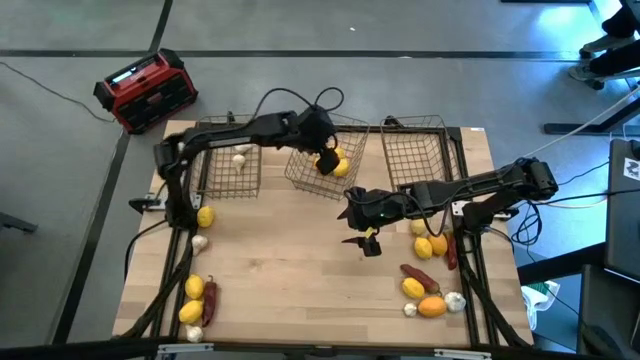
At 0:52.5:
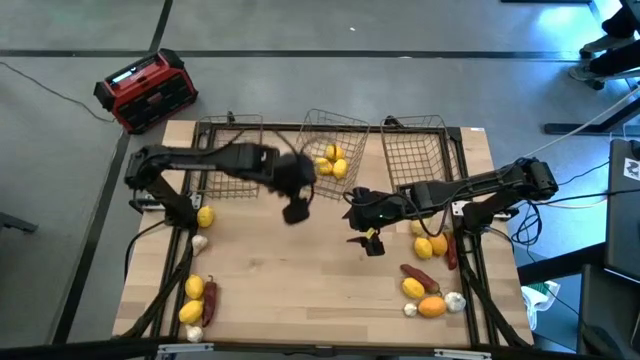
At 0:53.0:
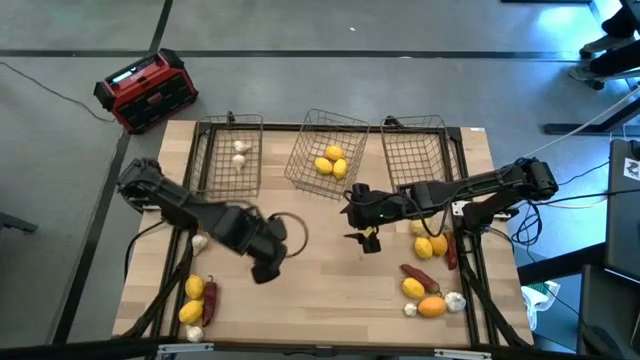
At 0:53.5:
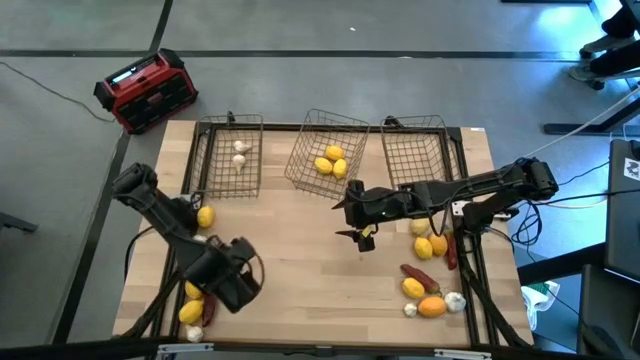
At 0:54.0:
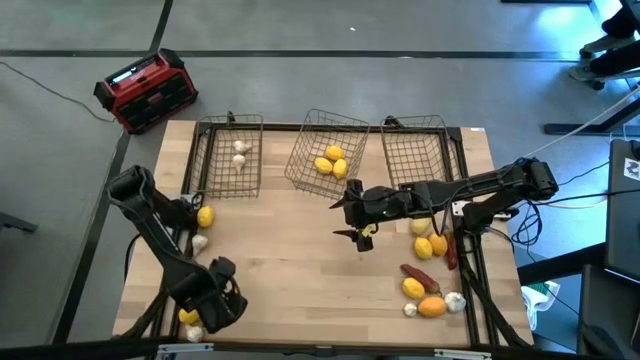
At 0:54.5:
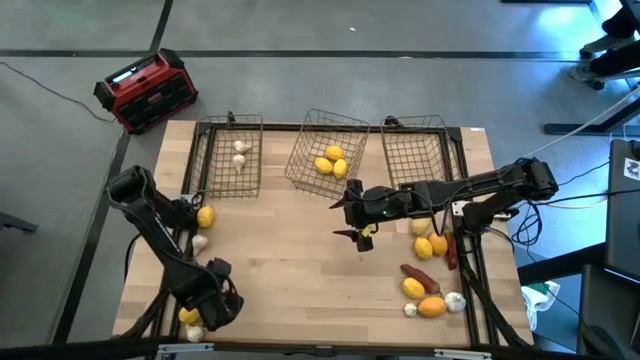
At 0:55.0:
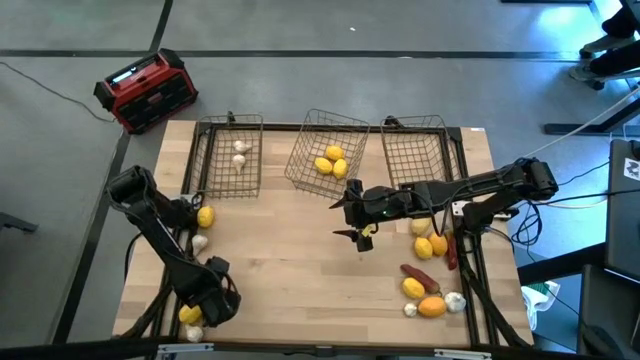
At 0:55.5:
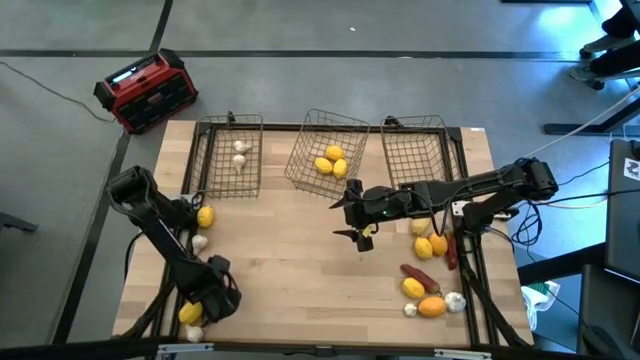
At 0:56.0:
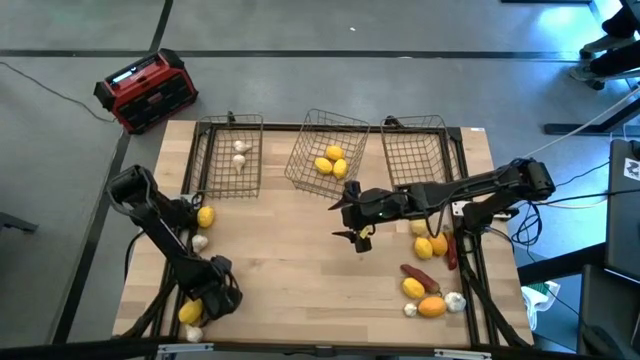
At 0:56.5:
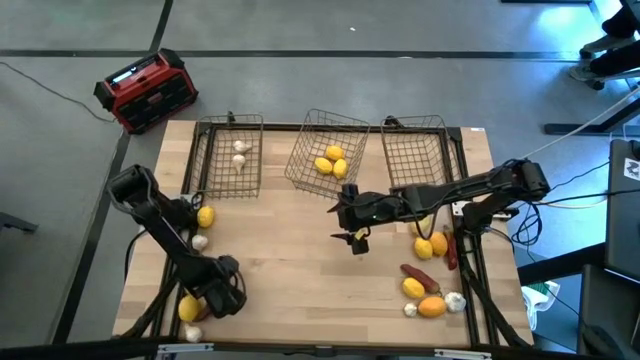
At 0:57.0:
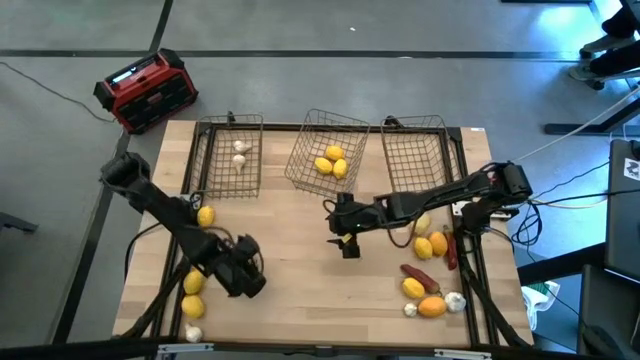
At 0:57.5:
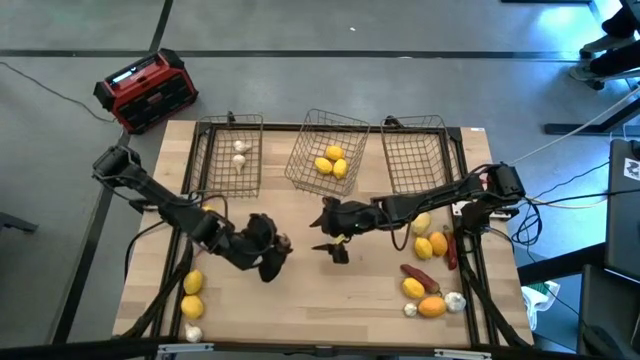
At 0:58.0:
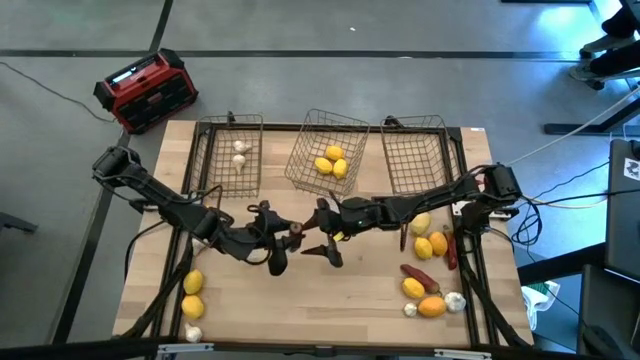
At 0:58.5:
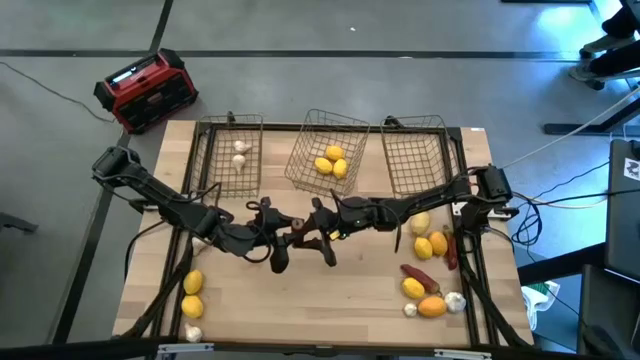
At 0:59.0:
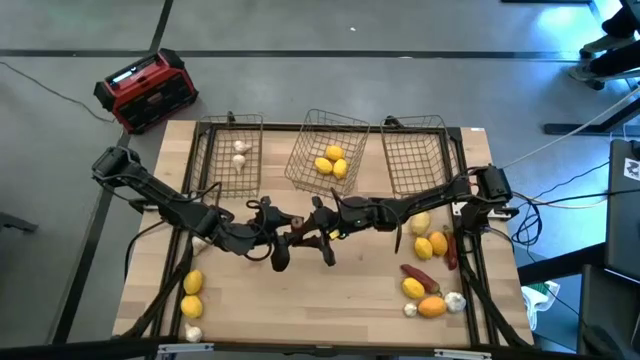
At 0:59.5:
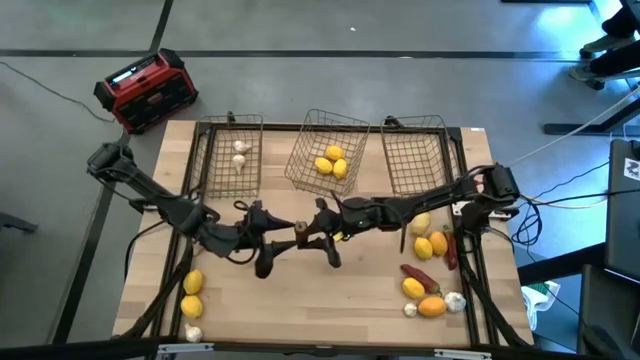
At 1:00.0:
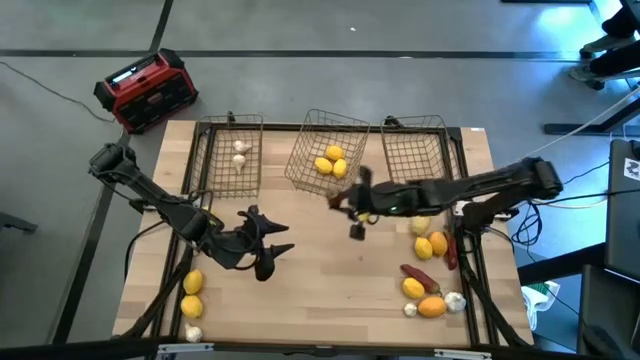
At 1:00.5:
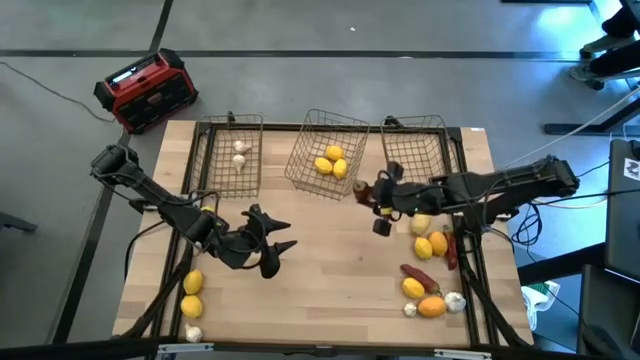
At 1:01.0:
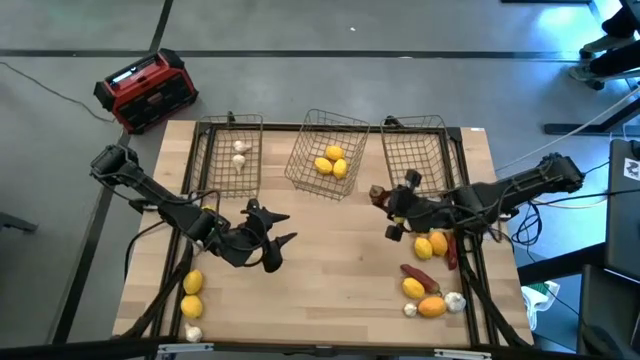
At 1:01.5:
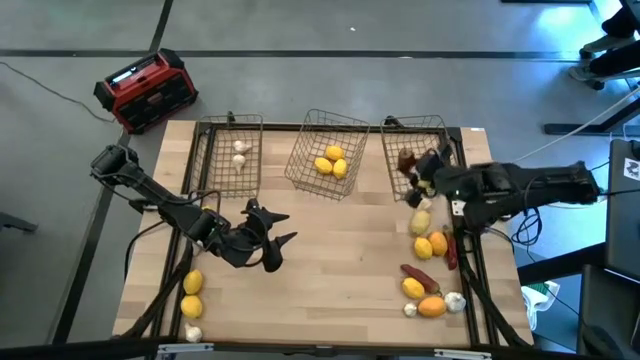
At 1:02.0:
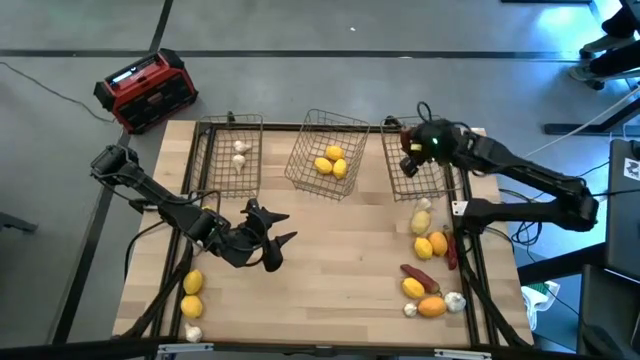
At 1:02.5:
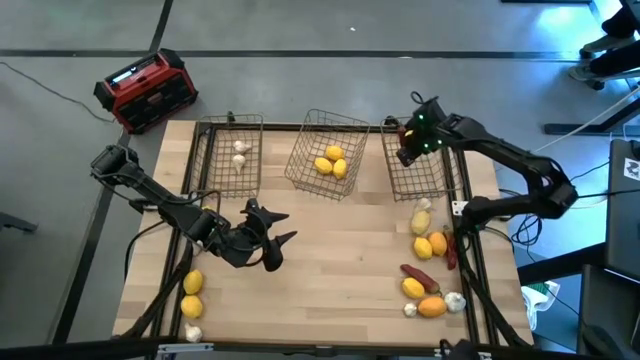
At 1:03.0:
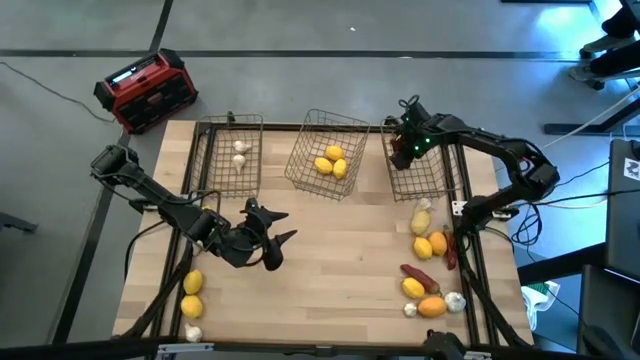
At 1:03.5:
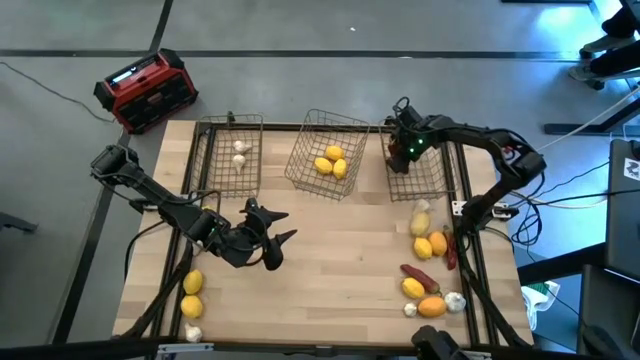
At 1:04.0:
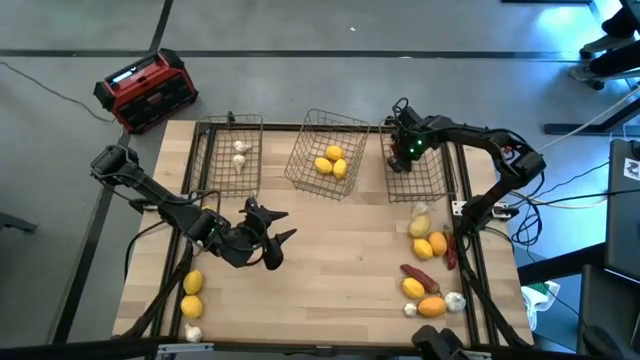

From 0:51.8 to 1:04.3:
Task: Sort produce into baskets
Put the bell pepper into the right wire basket

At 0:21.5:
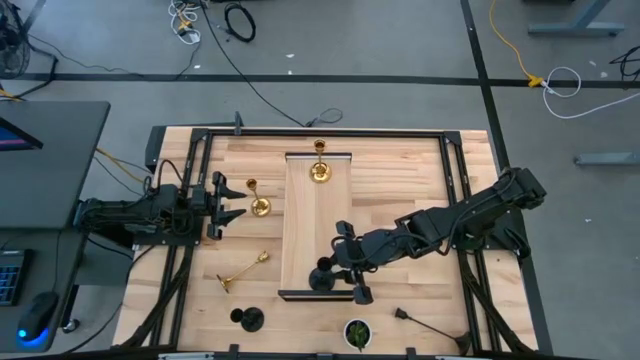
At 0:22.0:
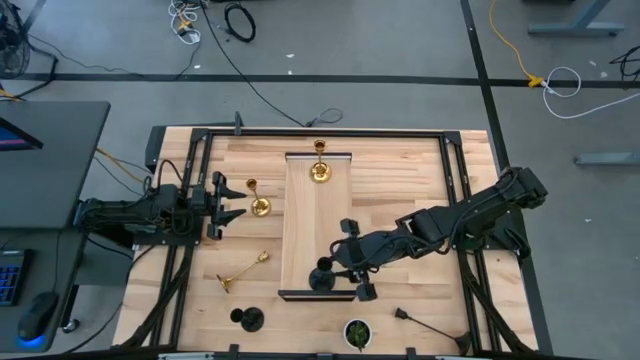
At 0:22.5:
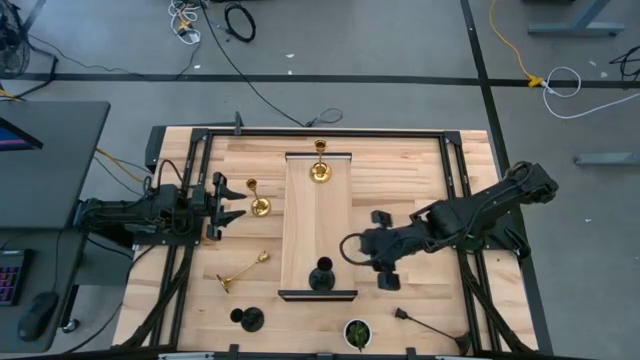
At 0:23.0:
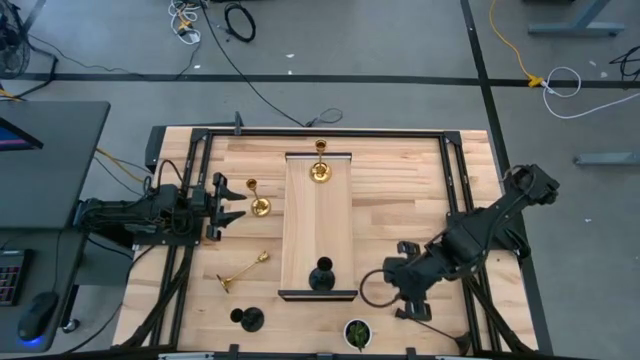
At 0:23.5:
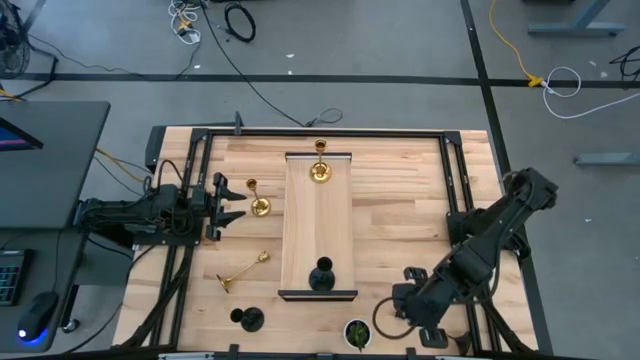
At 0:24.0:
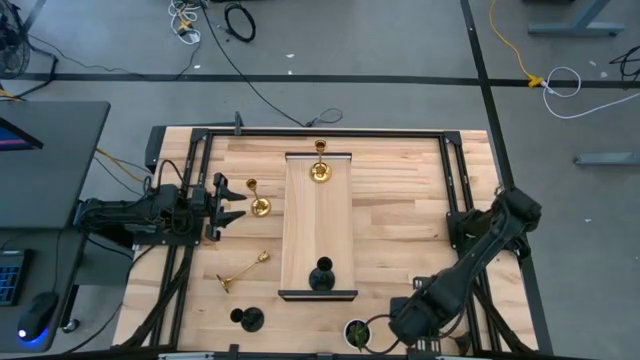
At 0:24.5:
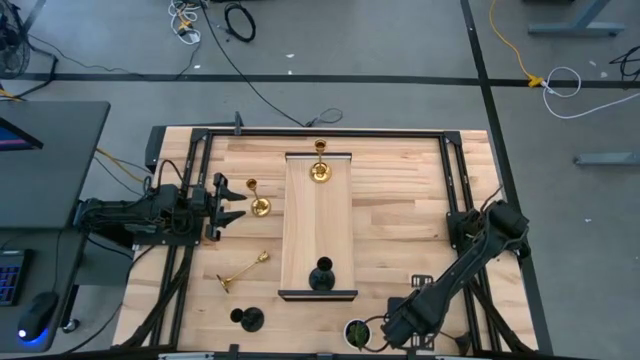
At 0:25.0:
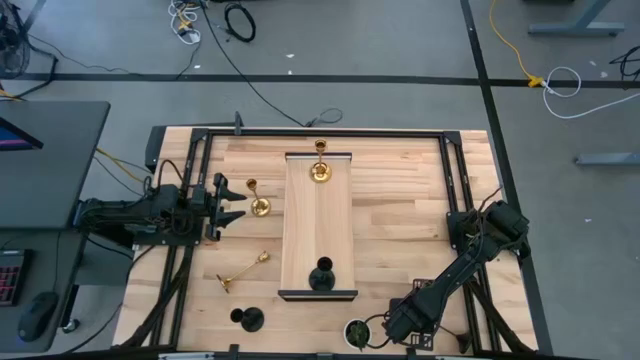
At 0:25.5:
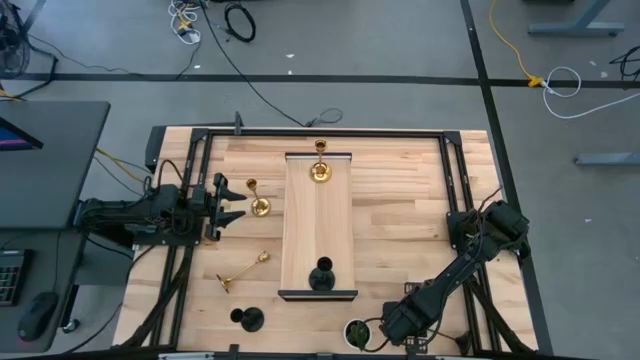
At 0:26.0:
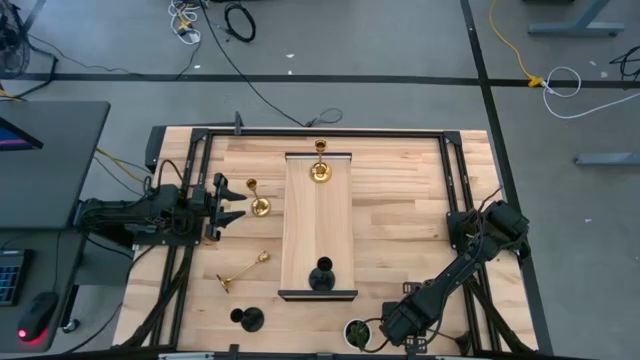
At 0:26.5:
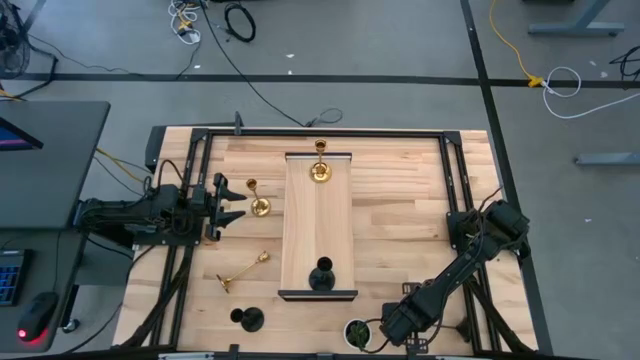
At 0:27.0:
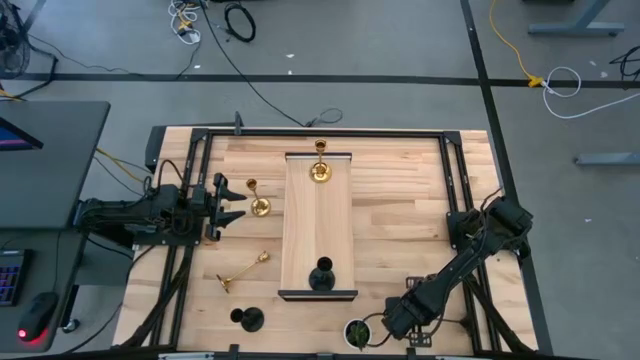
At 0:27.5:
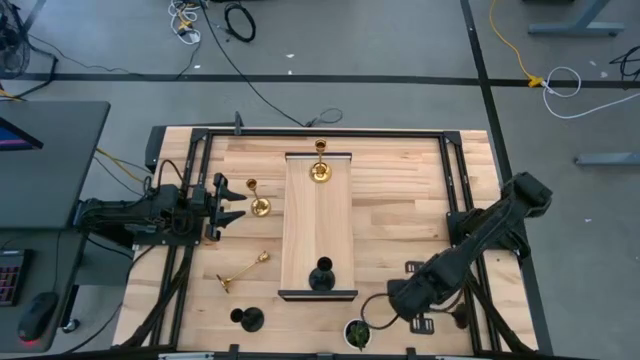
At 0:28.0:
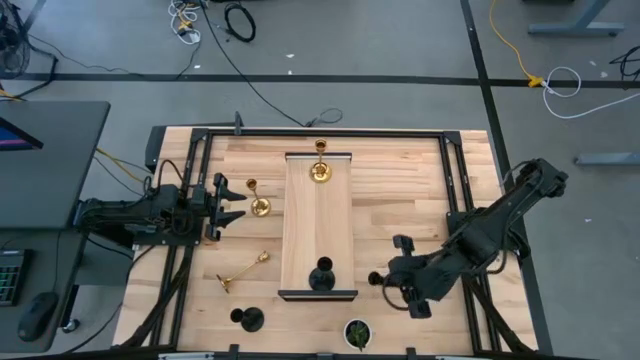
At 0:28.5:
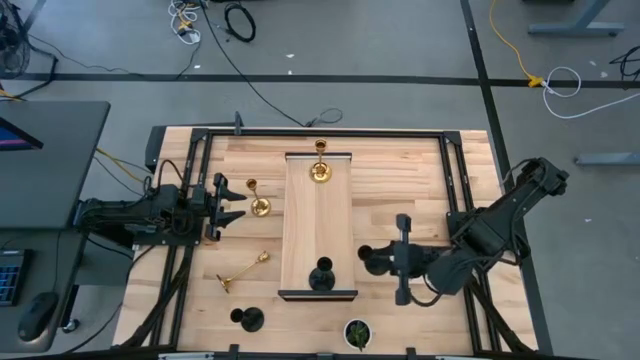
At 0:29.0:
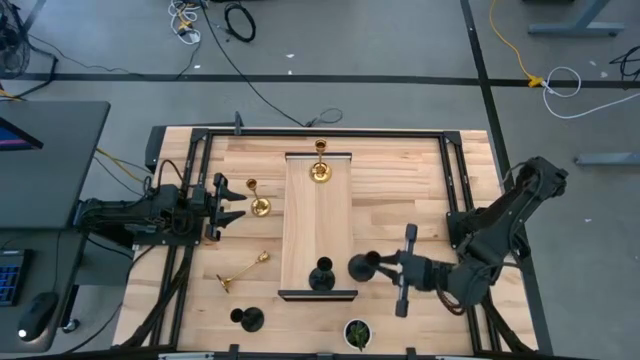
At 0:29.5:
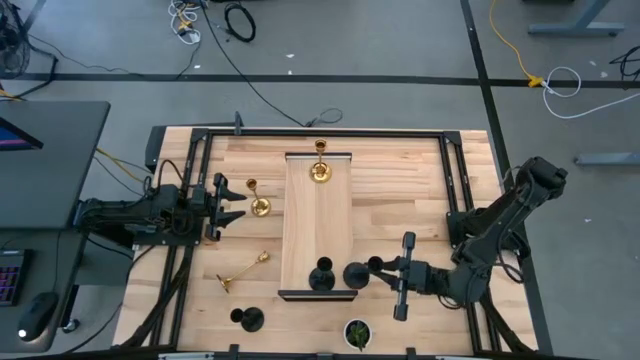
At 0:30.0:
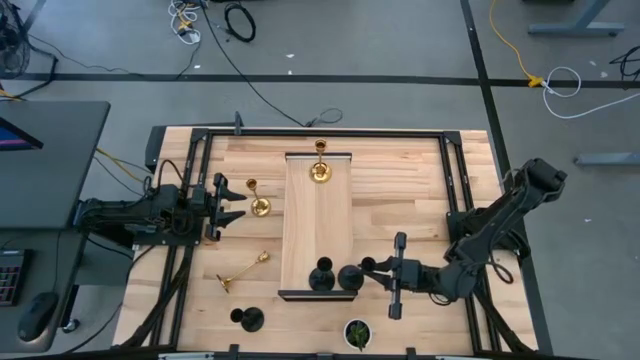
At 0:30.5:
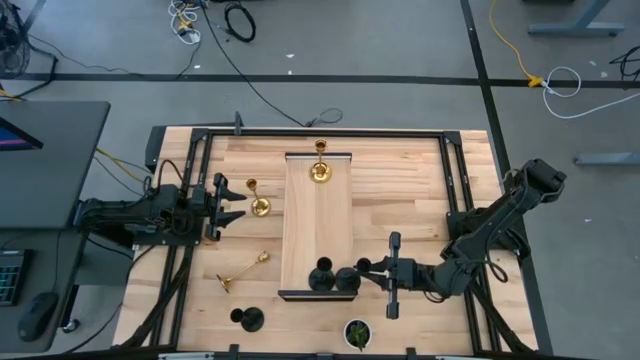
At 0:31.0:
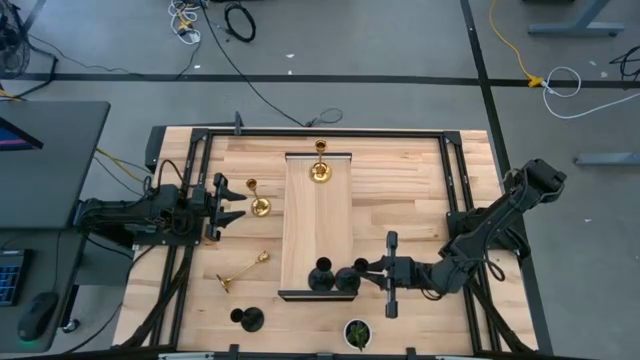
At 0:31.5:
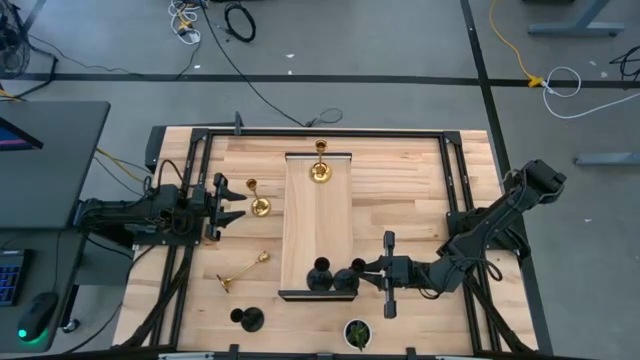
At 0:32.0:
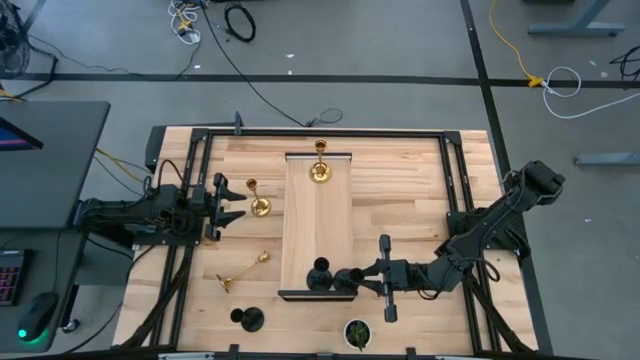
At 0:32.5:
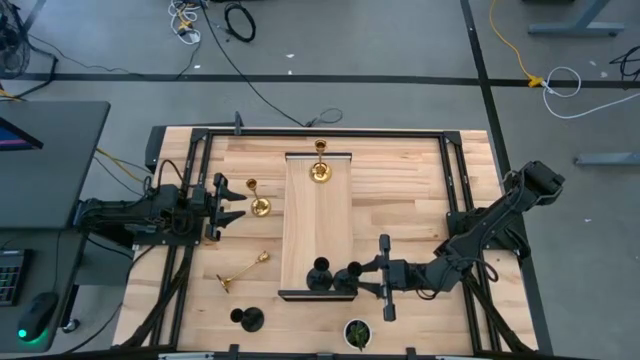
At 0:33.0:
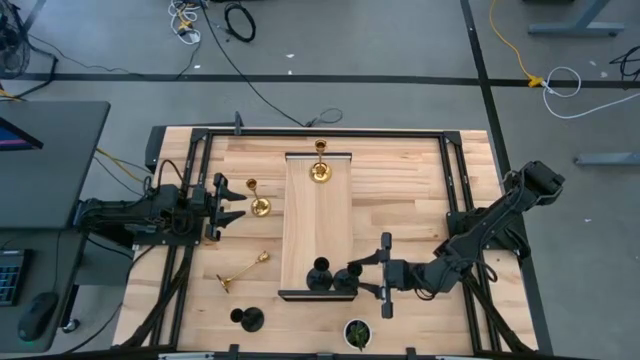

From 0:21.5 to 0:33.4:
Task: Pick & Place candle stick holders
Put the right black candle holder on the shelf aligned with the black candle holder
